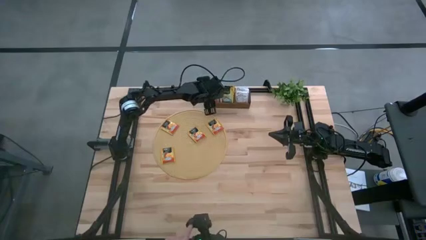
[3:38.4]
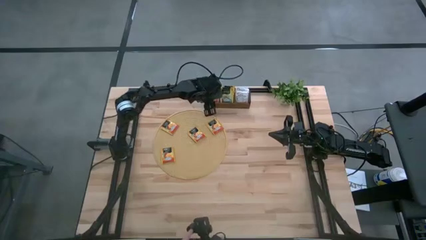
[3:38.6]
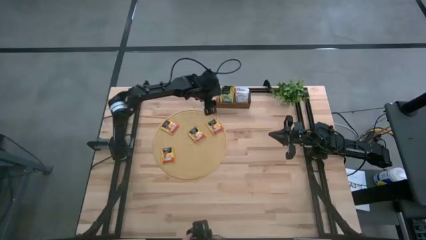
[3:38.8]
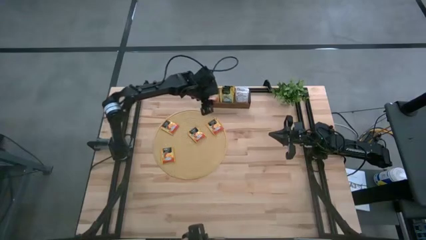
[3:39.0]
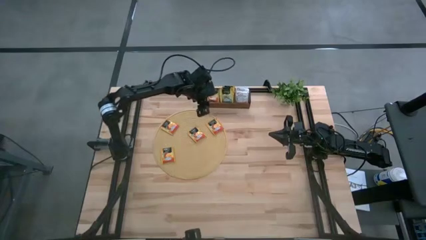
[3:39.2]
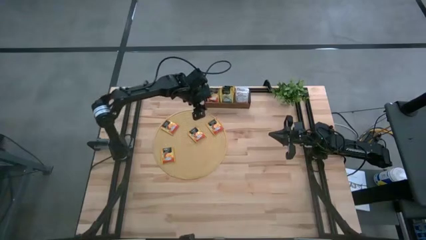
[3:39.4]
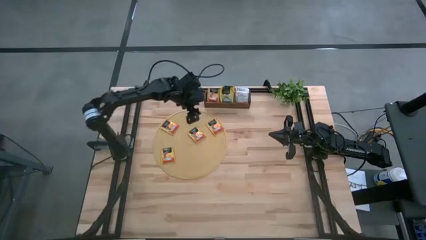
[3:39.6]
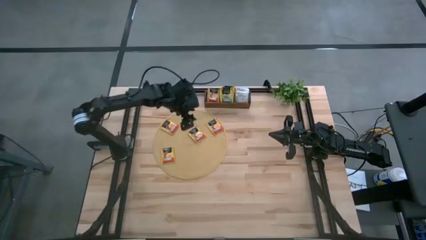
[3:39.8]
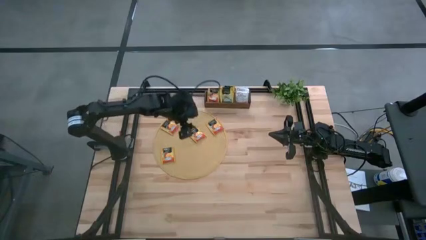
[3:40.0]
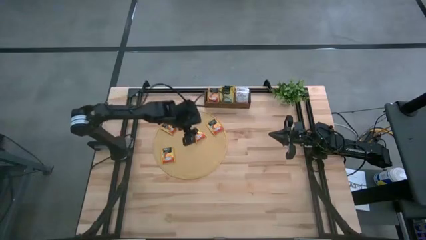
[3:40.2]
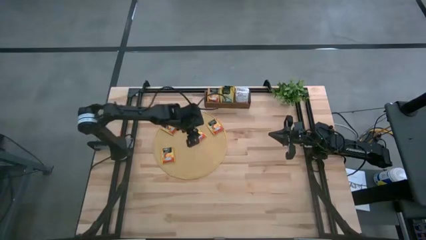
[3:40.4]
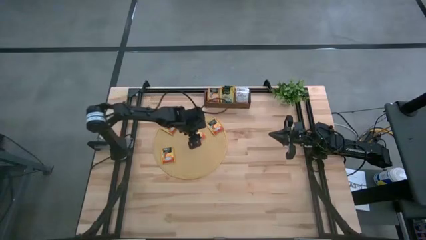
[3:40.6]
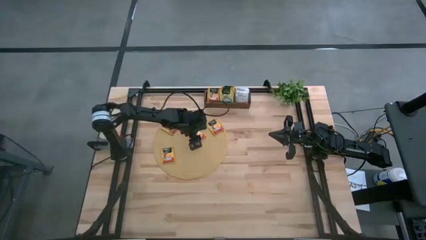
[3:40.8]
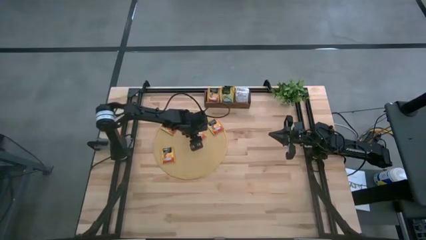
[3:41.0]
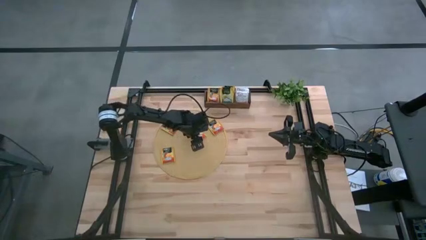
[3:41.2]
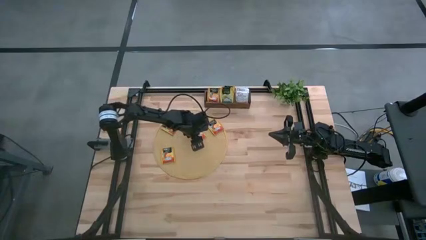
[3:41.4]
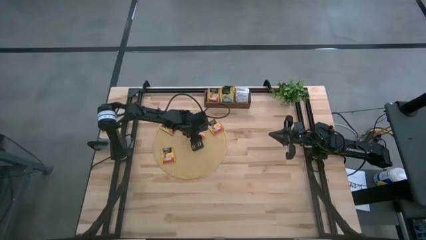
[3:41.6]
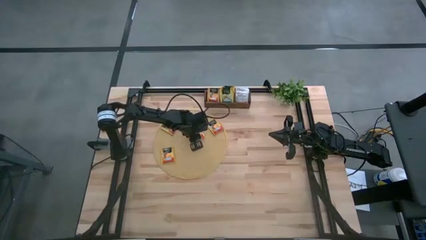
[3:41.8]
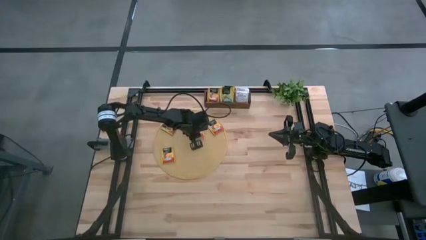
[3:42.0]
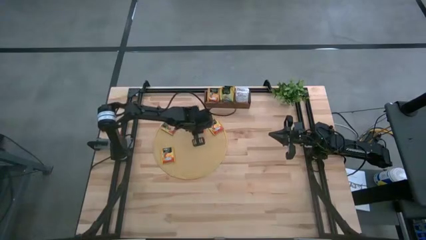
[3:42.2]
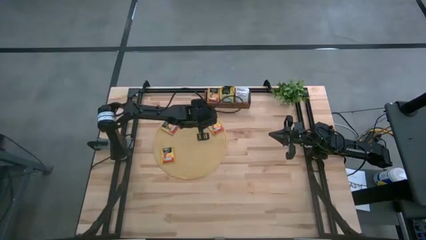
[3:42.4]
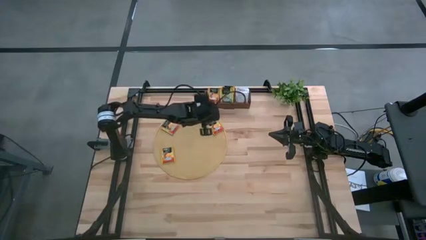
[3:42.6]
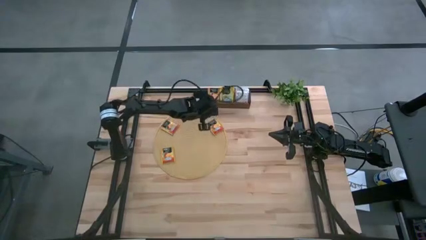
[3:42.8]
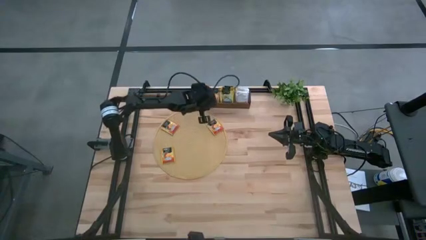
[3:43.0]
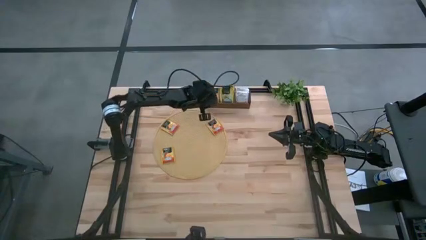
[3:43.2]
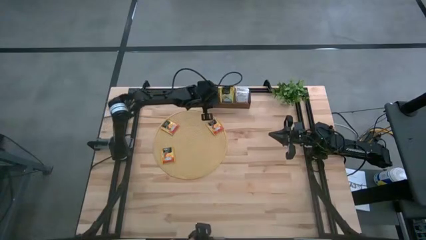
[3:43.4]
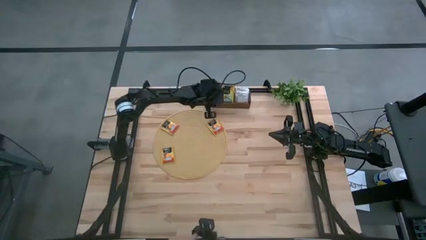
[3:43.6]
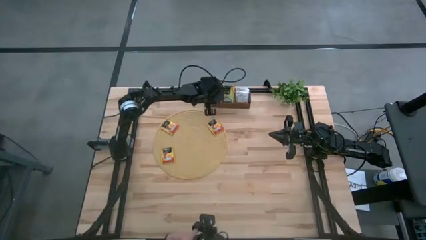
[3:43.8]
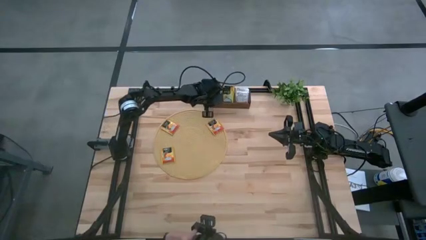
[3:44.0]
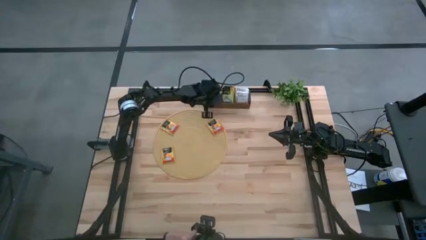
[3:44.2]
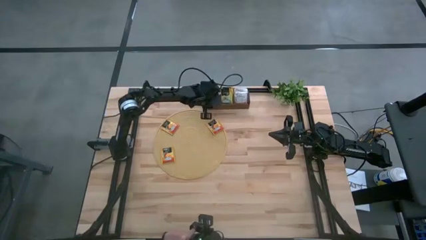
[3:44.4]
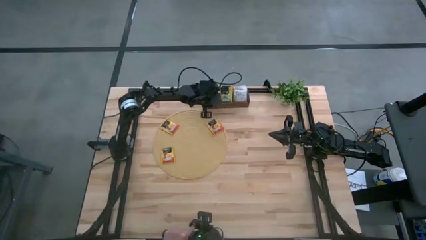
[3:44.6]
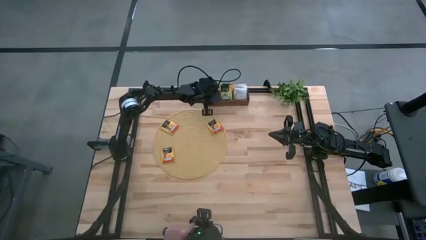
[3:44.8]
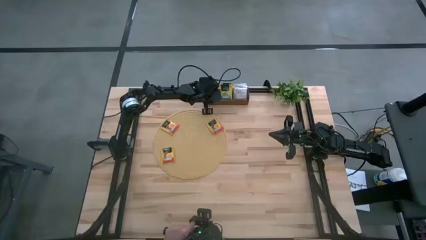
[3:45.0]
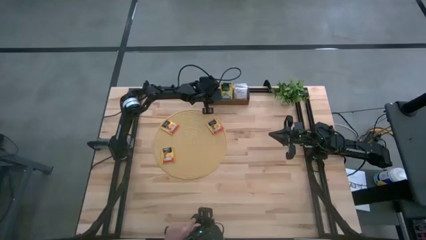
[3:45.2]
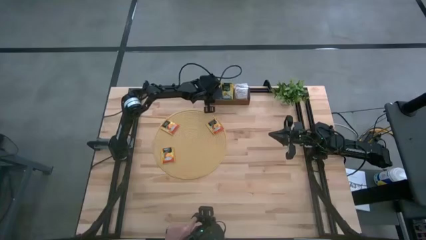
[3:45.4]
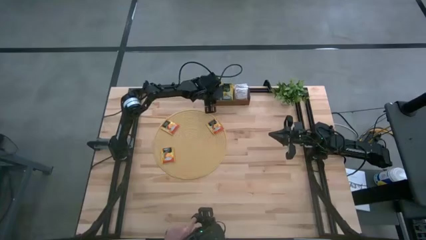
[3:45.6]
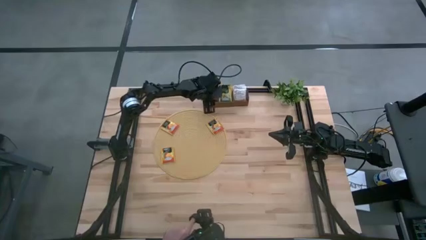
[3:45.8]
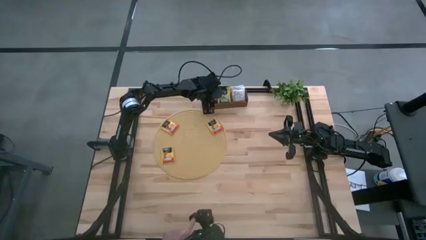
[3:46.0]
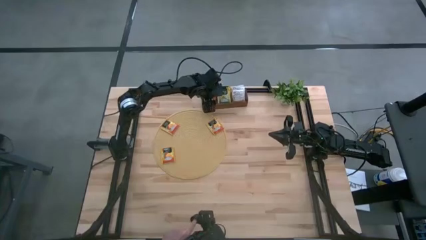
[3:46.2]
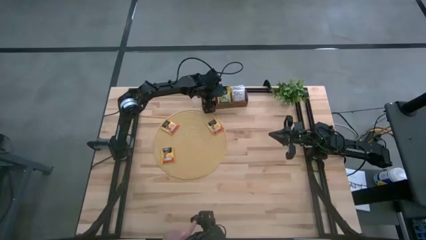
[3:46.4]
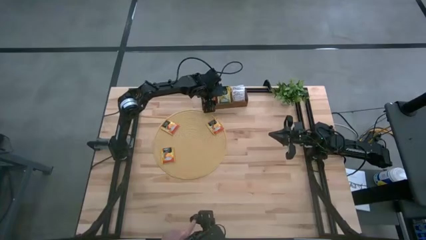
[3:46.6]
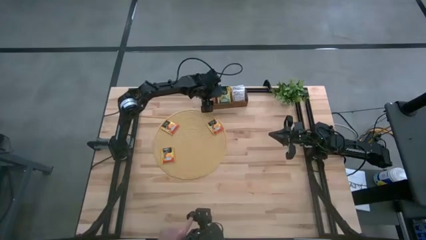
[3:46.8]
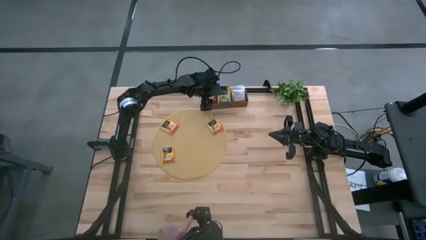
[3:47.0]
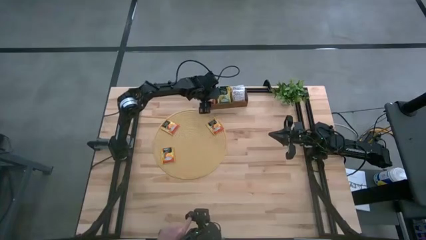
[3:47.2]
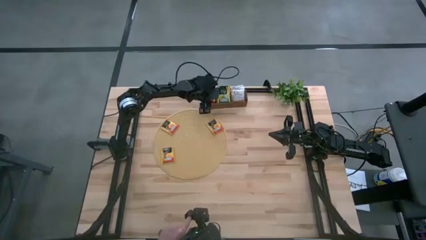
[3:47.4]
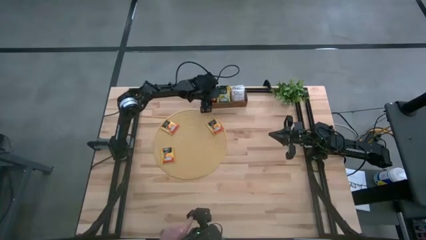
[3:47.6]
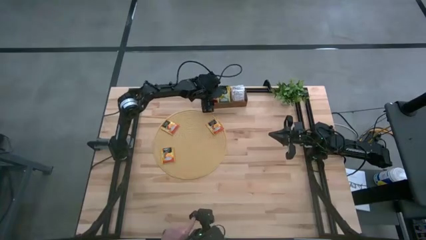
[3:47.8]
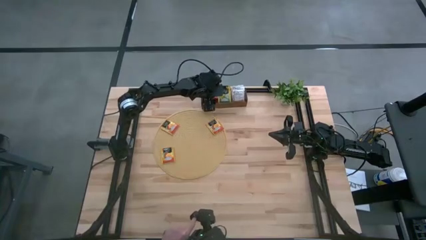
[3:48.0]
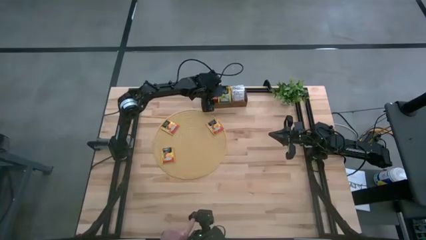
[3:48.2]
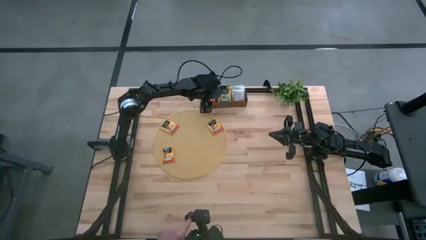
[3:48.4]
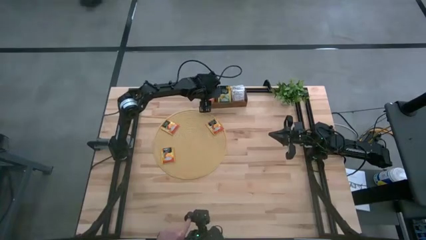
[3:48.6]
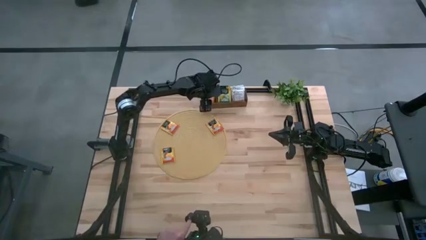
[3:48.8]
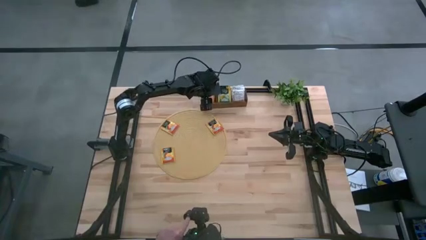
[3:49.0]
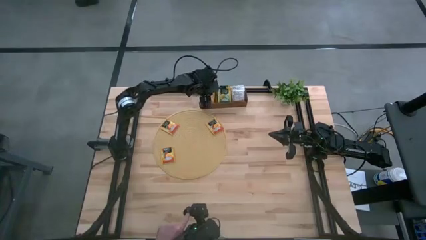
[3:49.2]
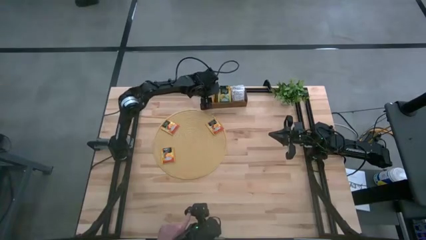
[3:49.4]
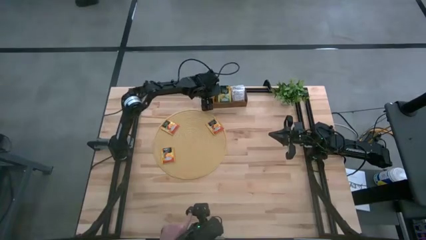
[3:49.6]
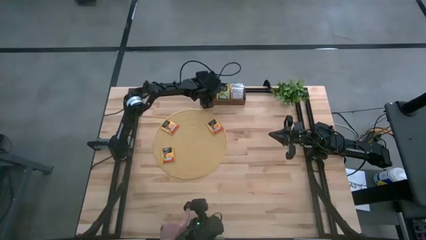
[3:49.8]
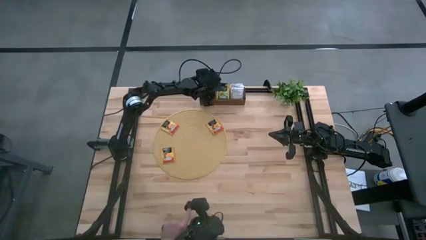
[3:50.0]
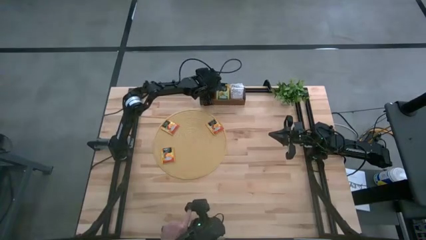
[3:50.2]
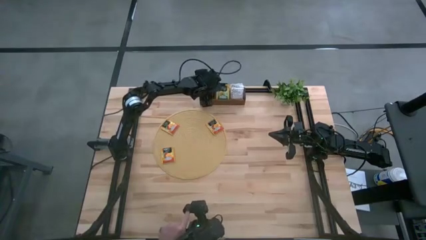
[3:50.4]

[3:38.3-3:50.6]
Task: Pick & Place Tea
Put the orange tea bag into the left section of the wooden organizer

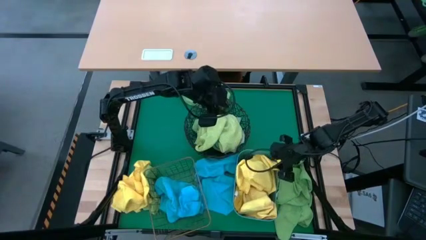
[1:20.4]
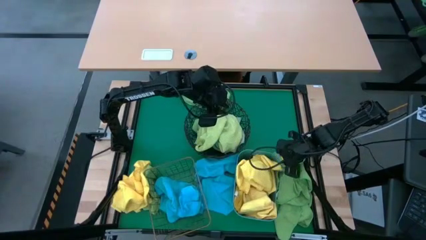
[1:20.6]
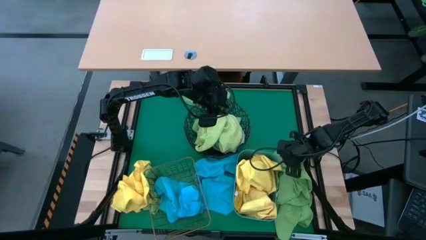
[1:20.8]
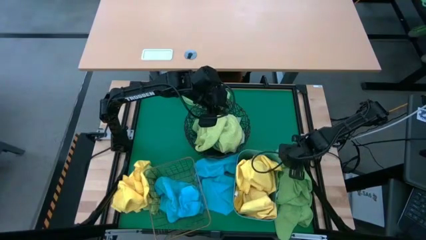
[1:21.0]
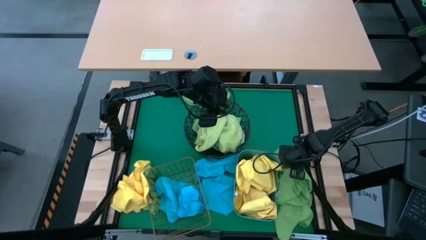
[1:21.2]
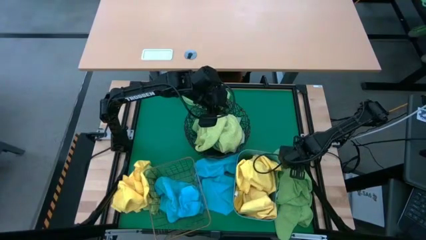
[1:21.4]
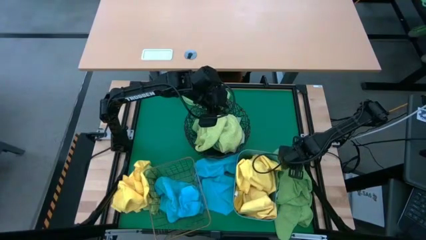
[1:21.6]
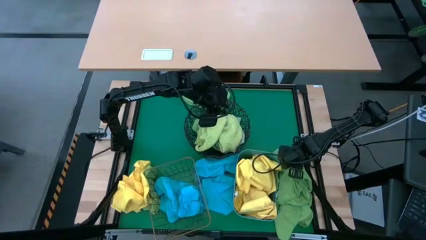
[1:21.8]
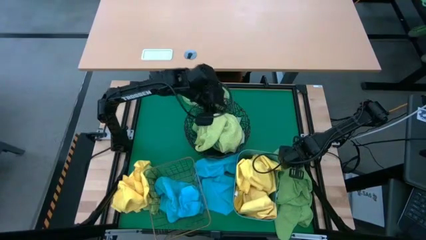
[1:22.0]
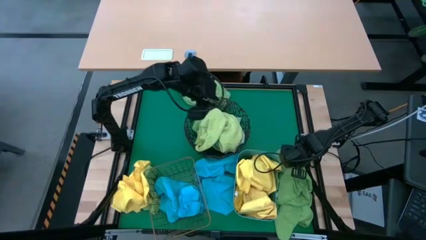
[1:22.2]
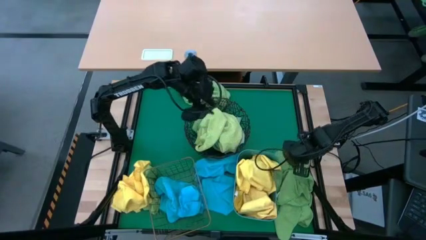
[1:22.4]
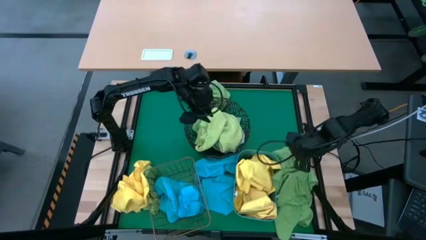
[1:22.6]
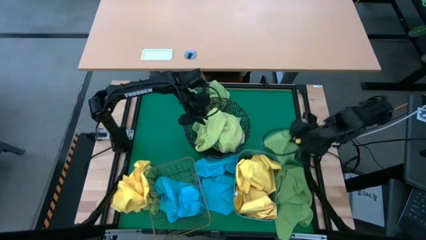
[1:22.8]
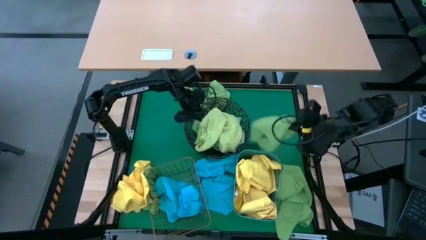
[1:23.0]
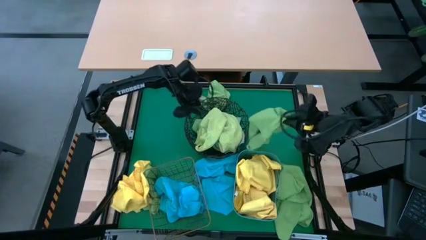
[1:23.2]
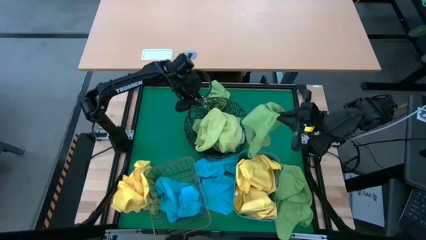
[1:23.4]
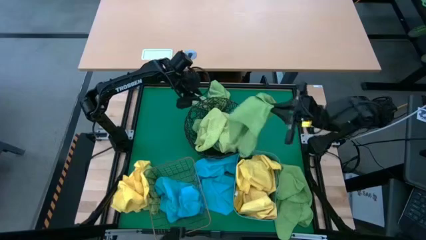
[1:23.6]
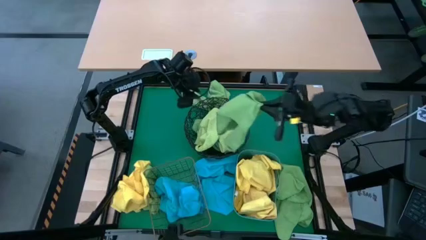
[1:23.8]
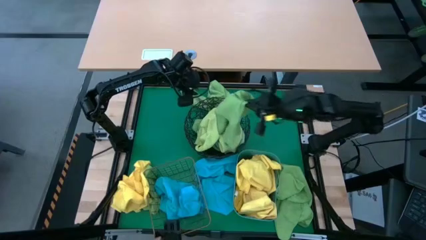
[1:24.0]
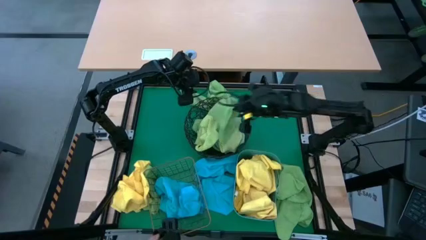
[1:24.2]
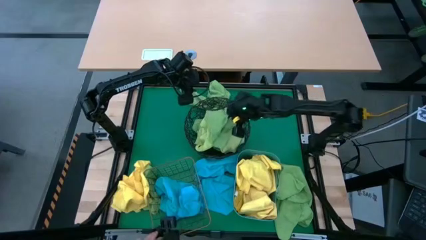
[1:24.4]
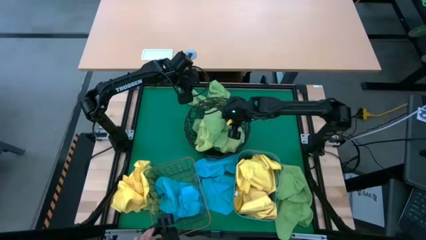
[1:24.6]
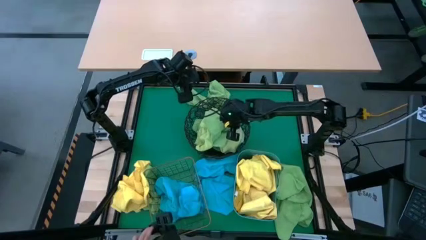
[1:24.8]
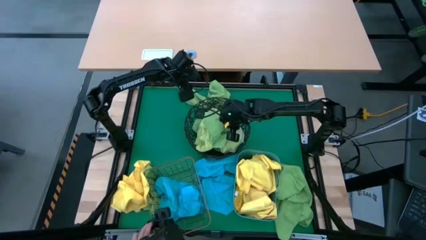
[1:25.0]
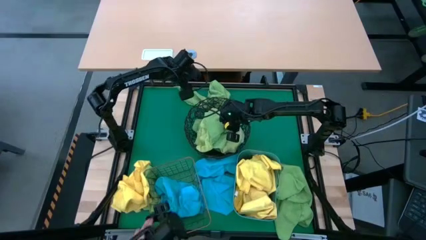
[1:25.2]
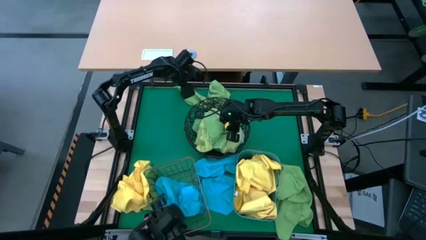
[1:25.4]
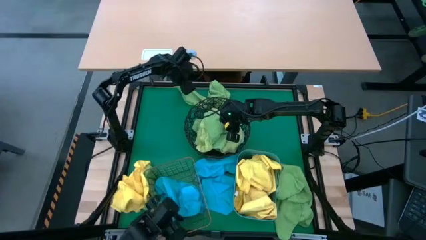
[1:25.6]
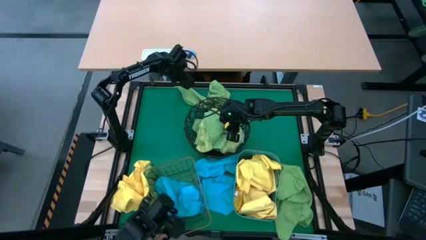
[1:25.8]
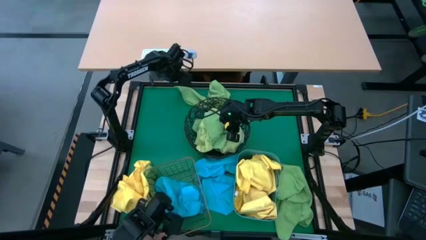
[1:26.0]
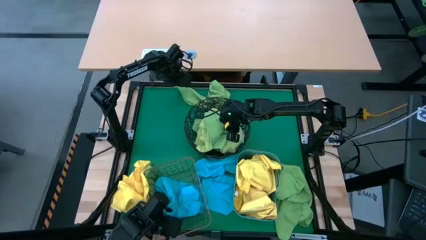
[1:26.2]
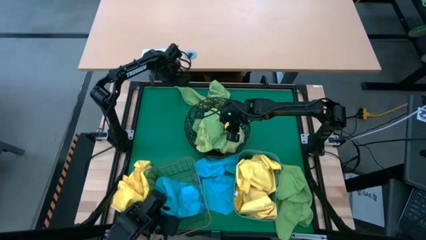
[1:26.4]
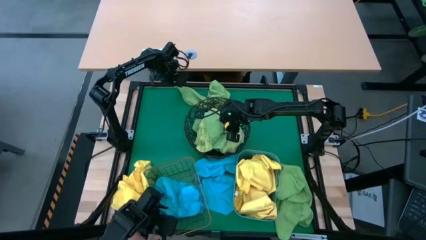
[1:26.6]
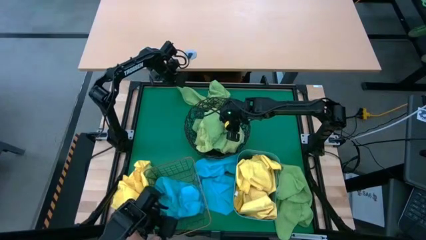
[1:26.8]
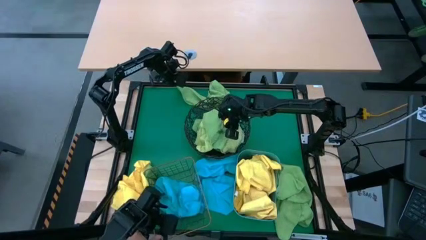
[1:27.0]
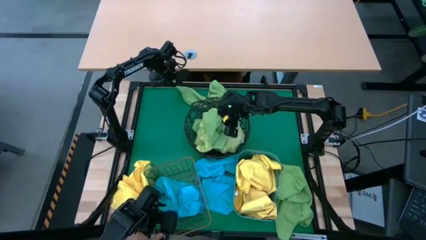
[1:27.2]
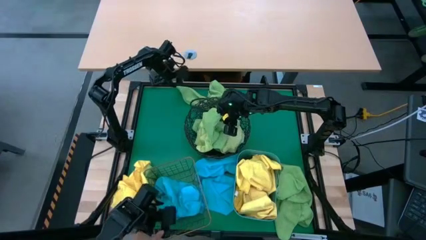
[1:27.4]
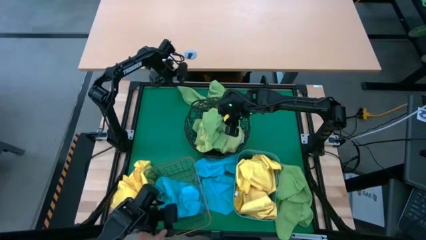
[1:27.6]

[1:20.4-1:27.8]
Task: Sort microfiber towel by color & place in baskets
Put the green microfiber cloth into the round wire basket
